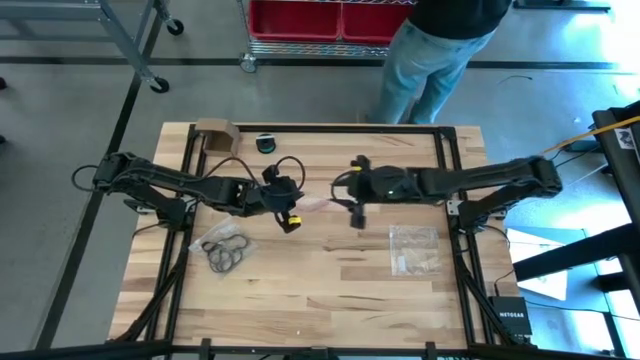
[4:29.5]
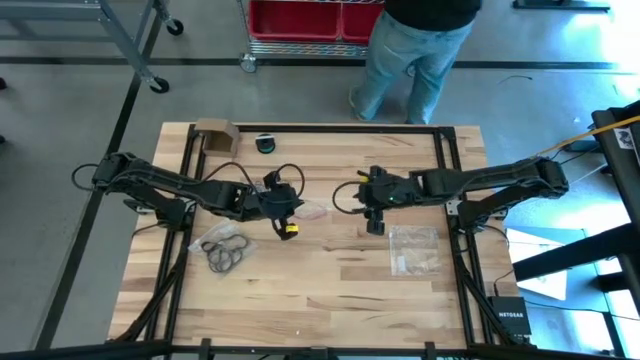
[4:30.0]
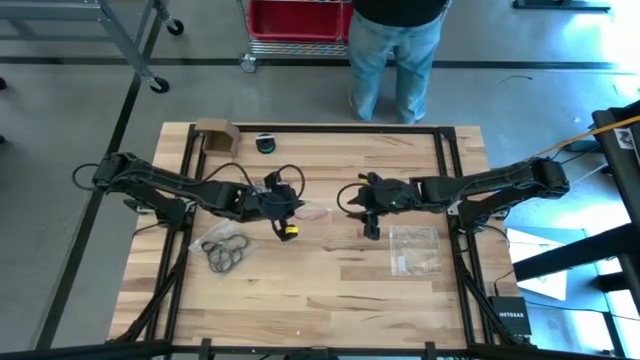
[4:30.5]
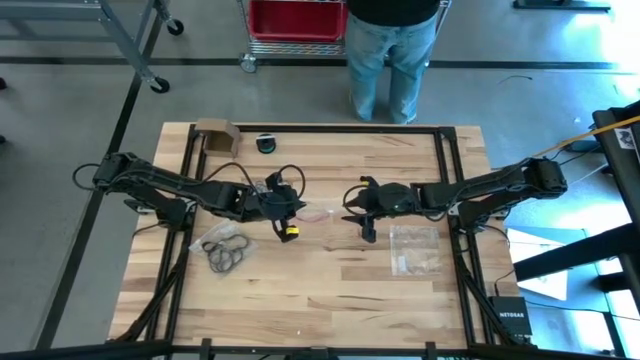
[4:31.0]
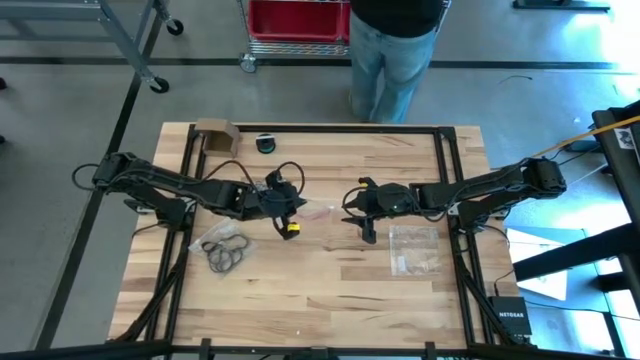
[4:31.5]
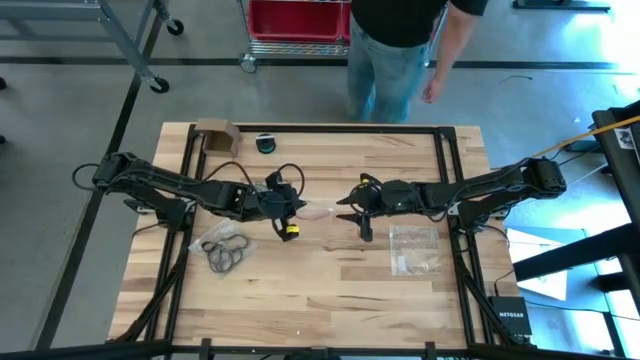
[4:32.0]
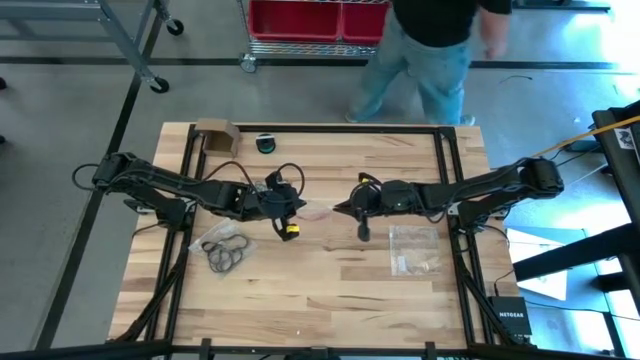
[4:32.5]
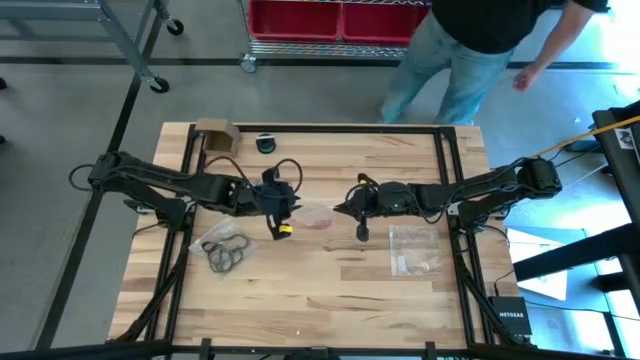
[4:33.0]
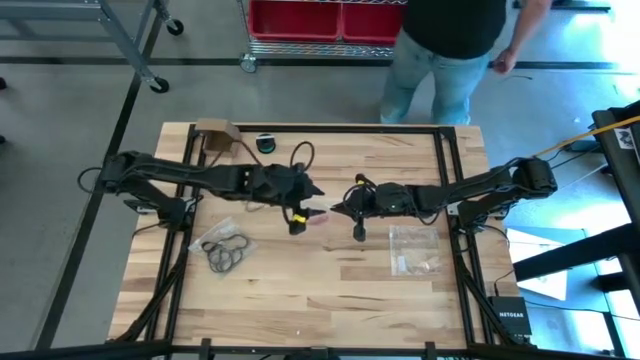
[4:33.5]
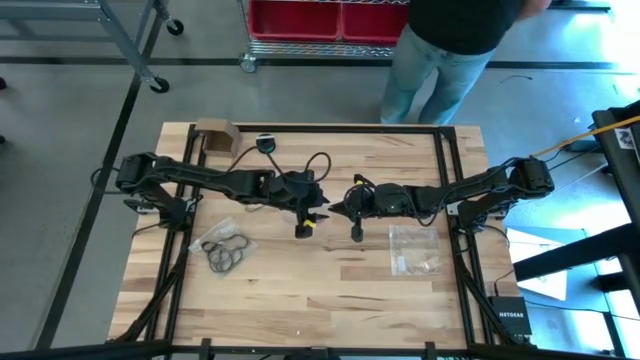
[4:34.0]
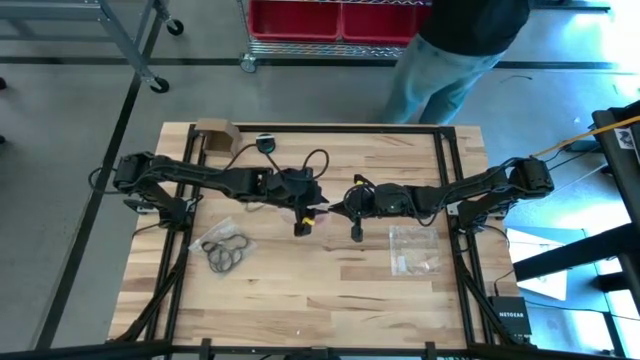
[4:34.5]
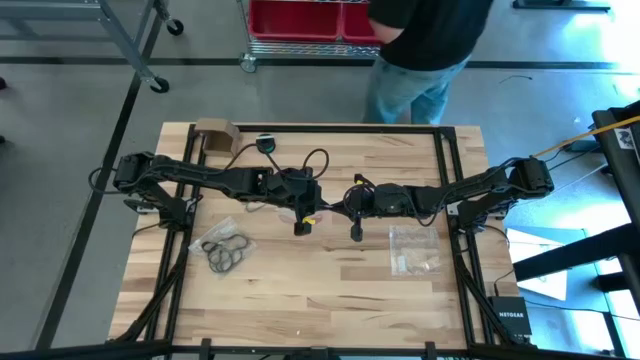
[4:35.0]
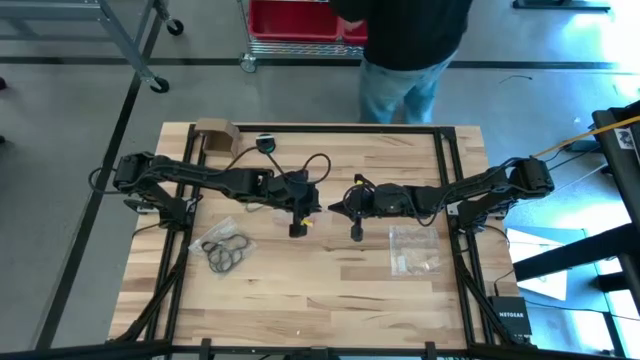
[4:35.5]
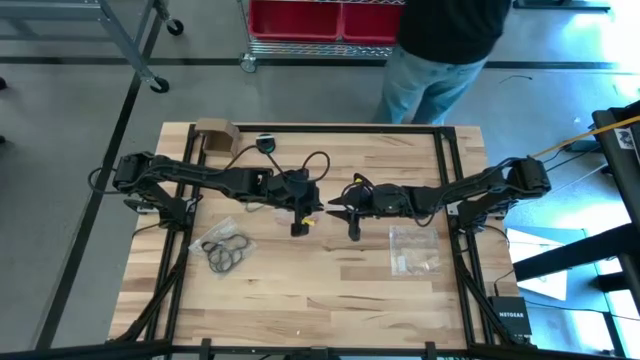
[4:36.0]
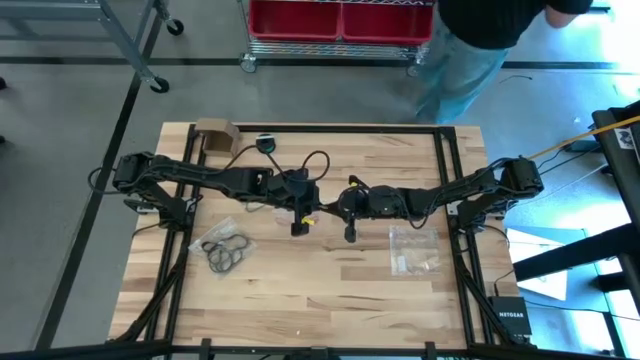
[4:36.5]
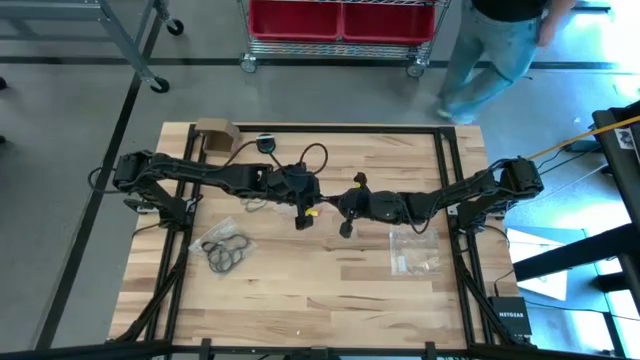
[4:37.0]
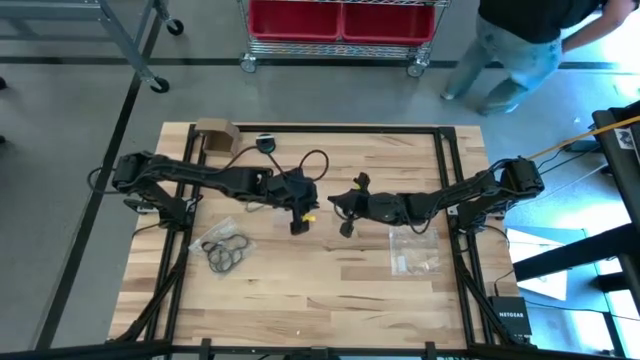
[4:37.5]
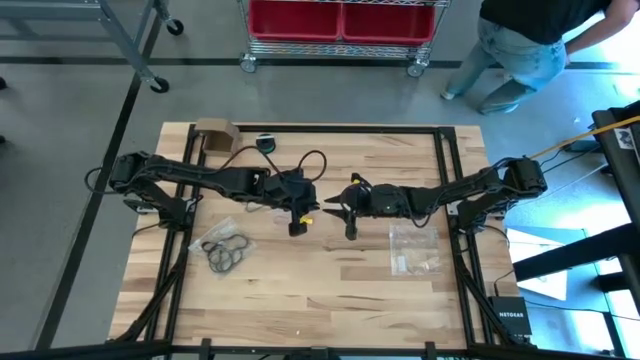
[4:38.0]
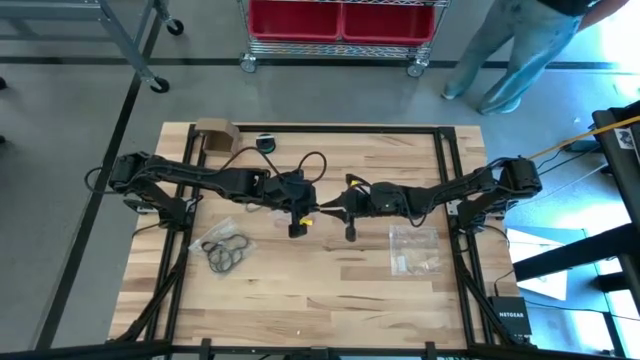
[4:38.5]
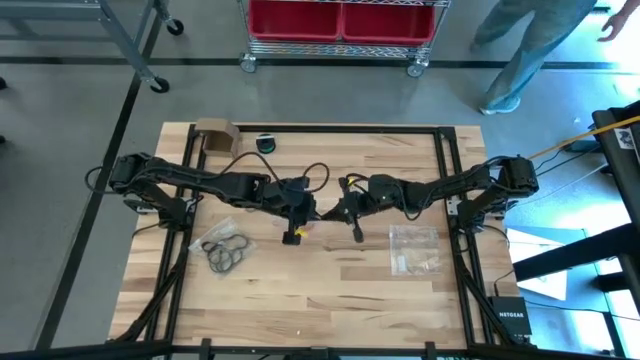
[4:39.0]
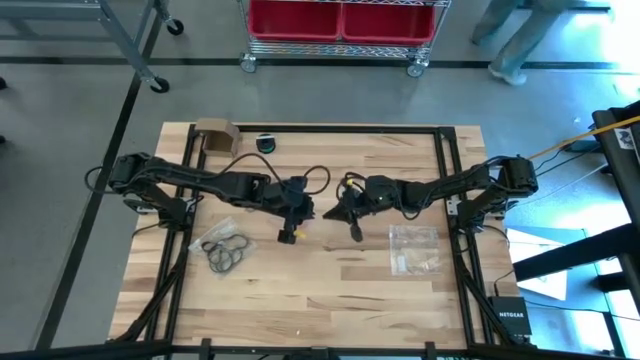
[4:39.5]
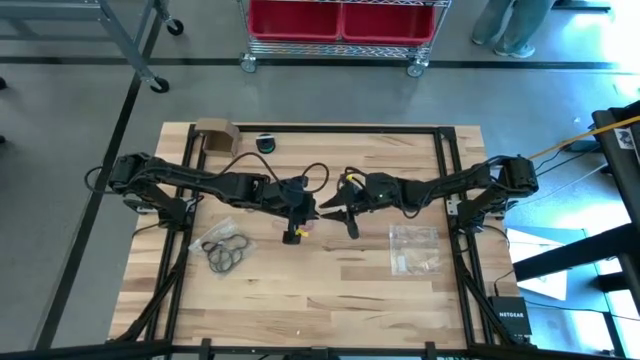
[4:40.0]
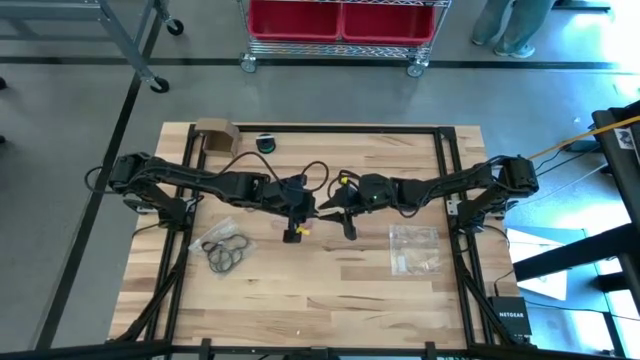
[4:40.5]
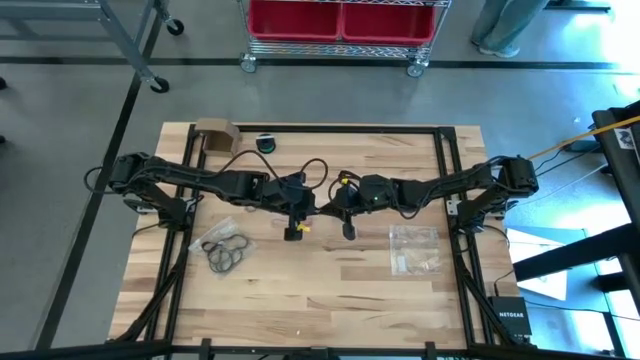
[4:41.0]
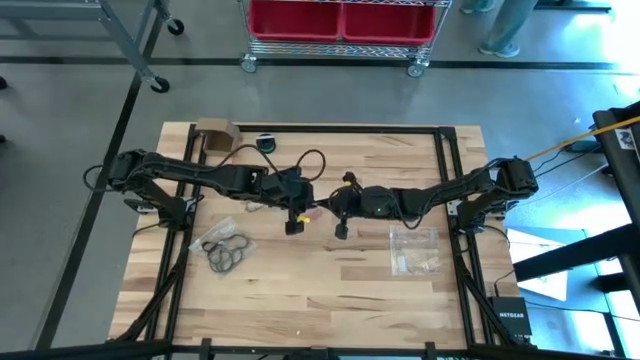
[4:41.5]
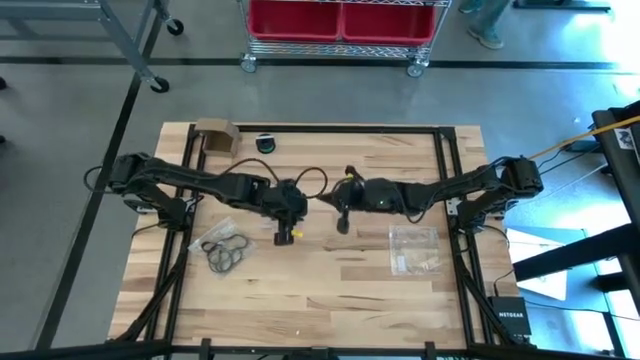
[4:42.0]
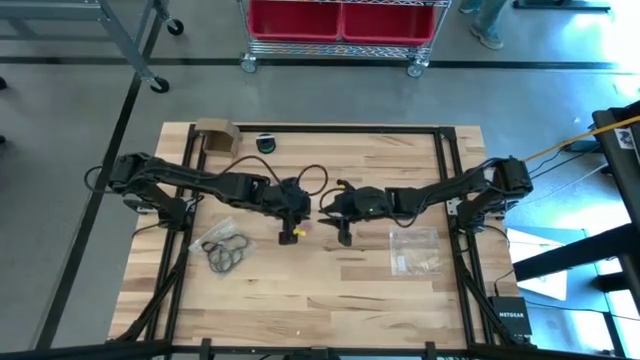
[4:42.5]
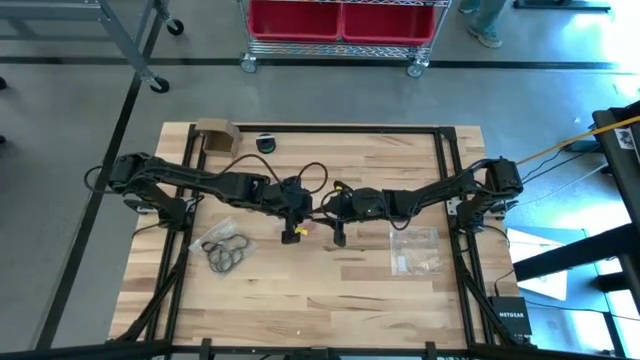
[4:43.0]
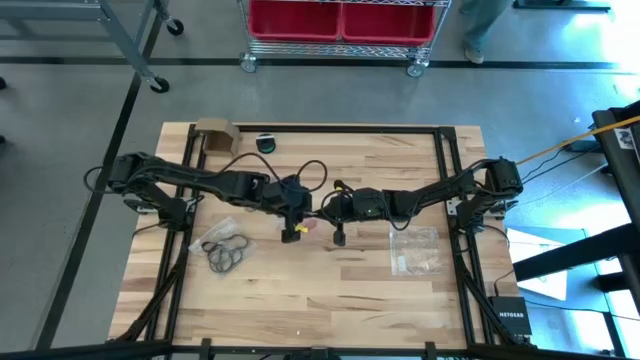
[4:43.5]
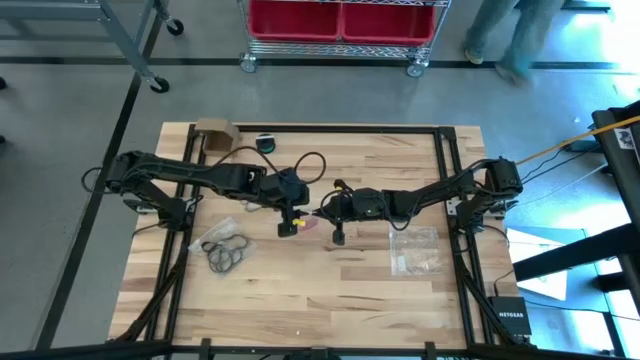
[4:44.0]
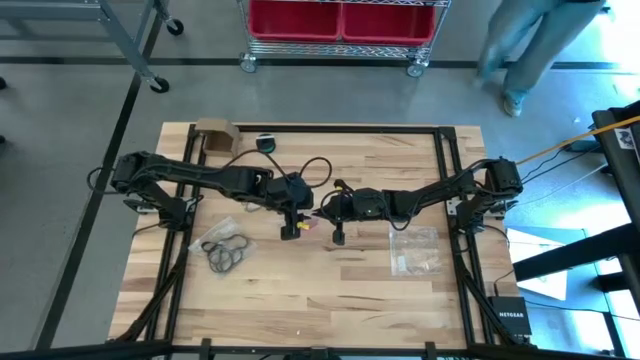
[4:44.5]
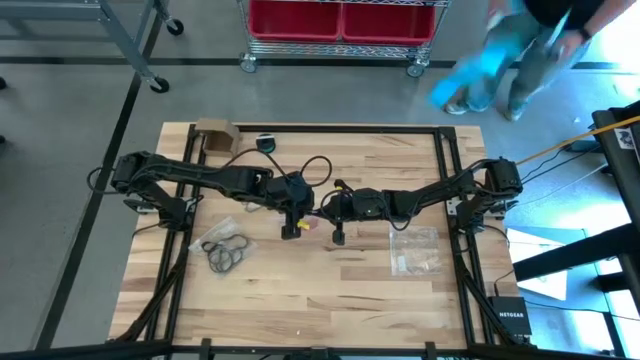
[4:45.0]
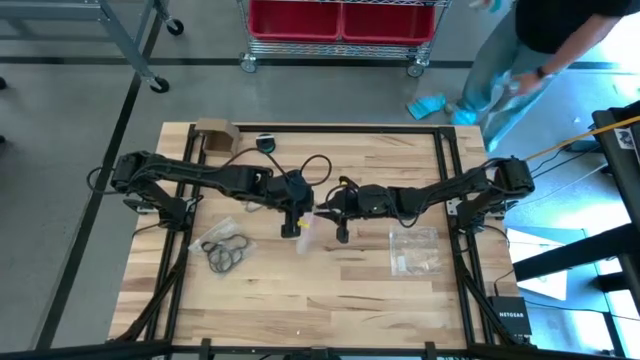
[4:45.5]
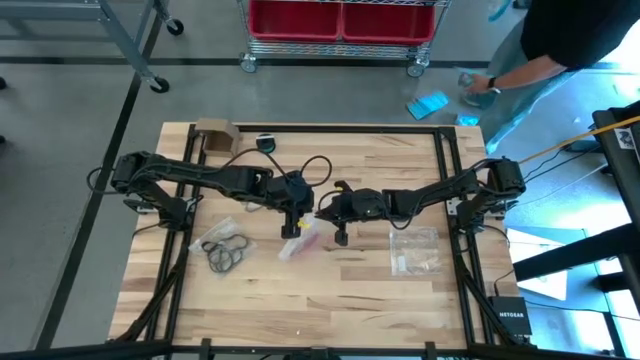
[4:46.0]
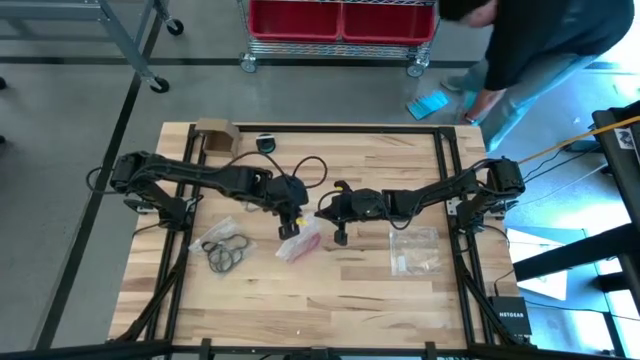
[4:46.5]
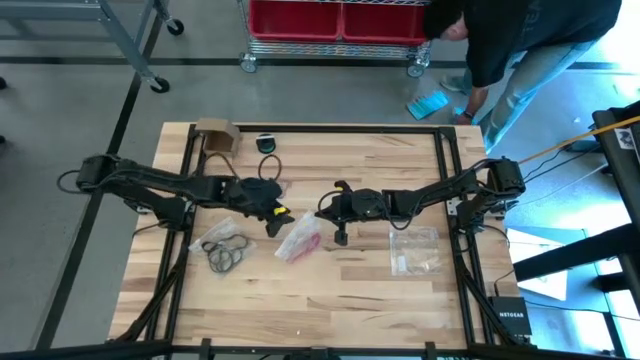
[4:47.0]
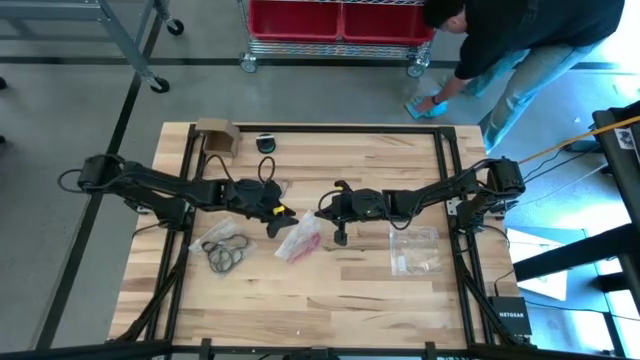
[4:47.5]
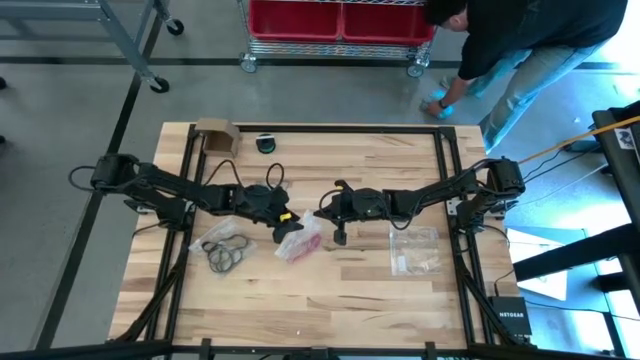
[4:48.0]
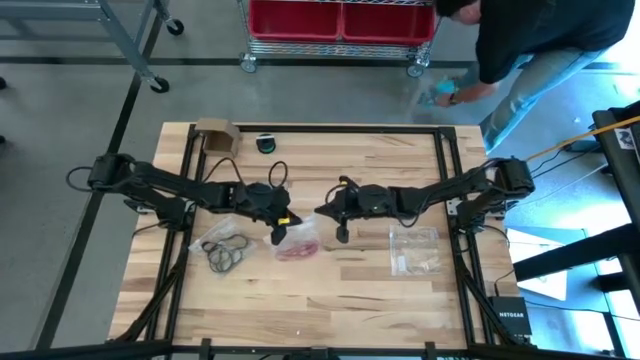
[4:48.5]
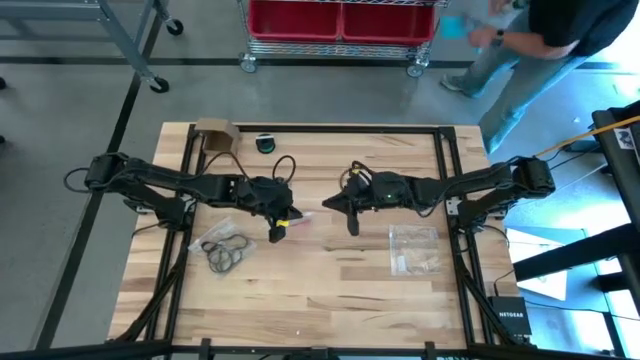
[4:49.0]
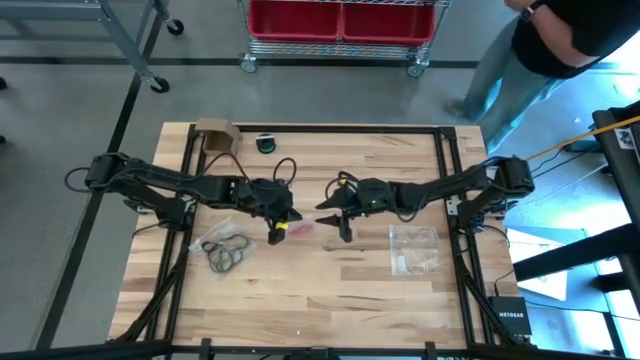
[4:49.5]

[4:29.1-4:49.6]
Task: Sort rubber bands
Close the transparent zip bag

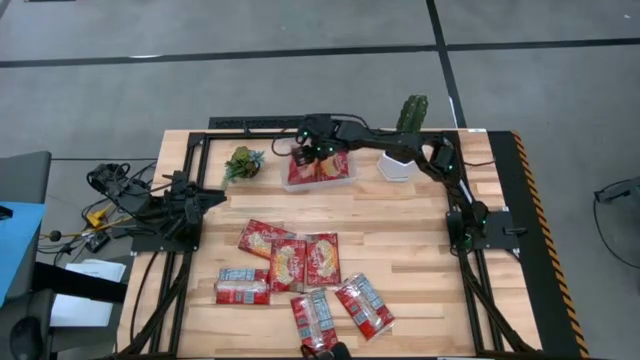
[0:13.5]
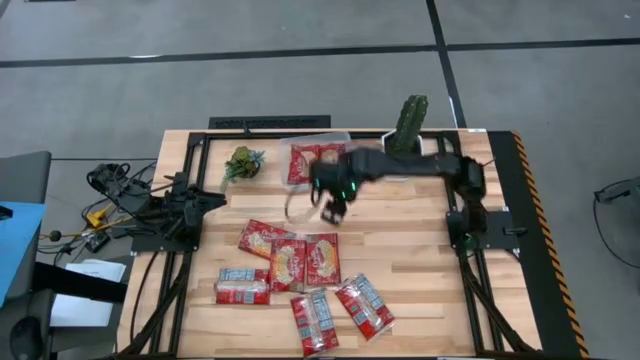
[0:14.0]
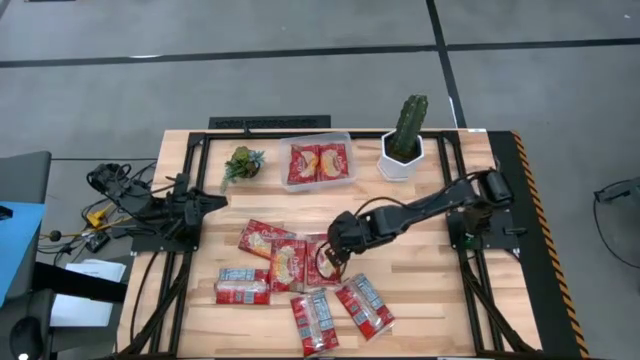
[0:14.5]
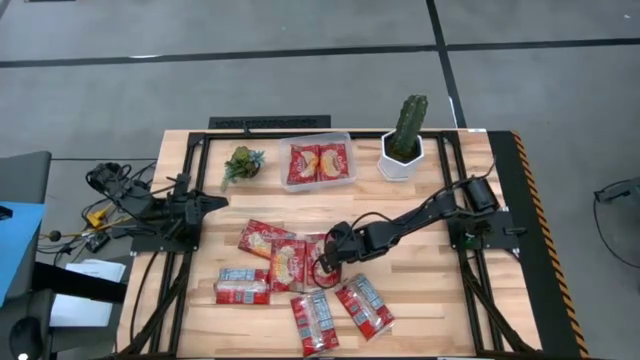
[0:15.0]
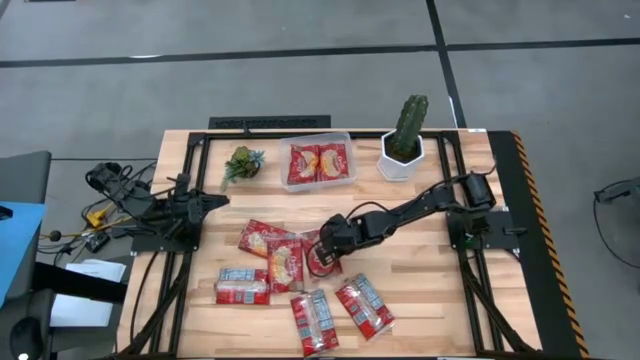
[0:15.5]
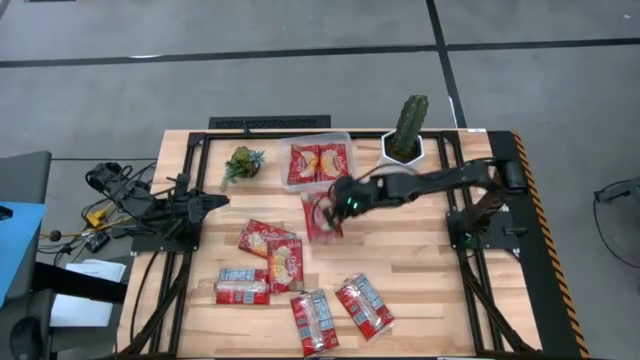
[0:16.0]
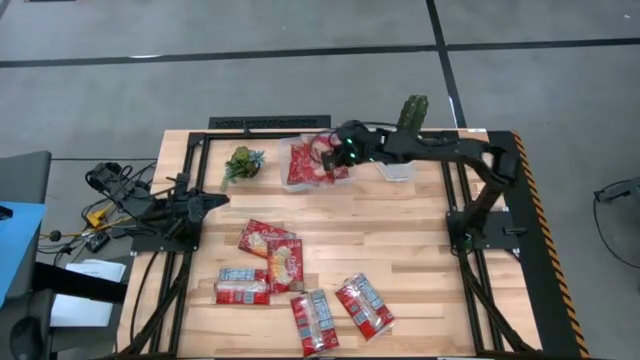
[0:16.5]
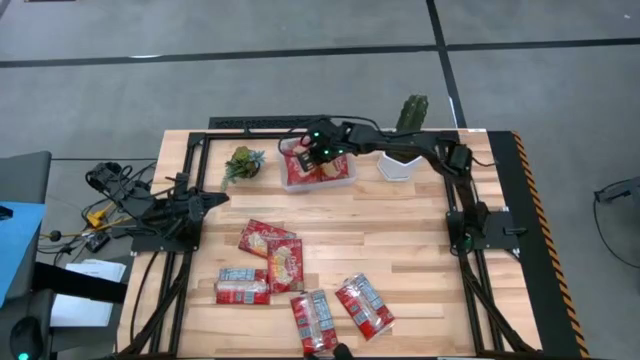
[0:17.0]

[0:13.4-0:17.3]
Task: Sort popcorn bags into baskets
Put the red popcorn bag into the transparent bin
